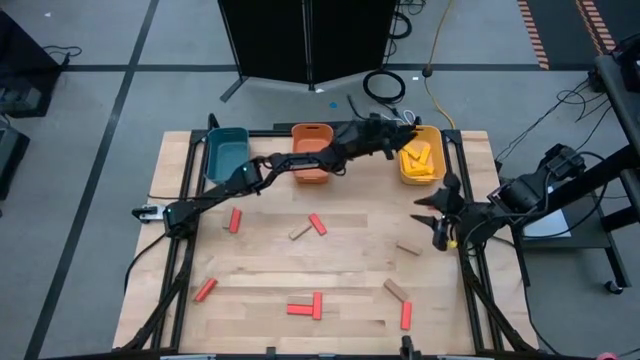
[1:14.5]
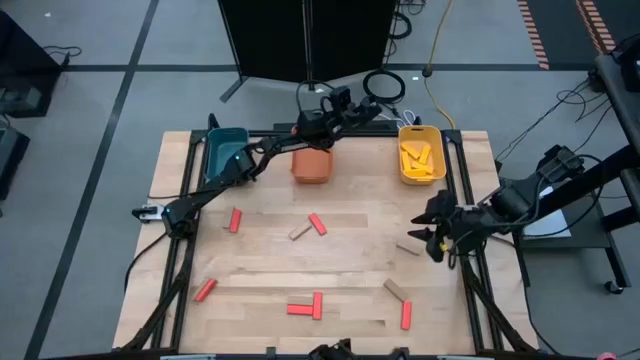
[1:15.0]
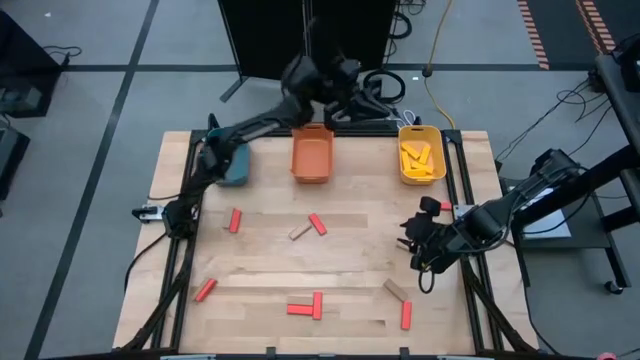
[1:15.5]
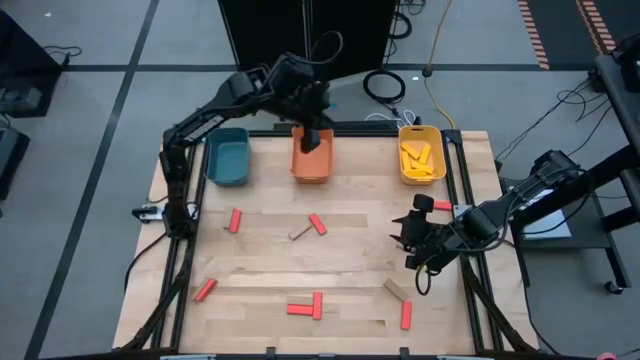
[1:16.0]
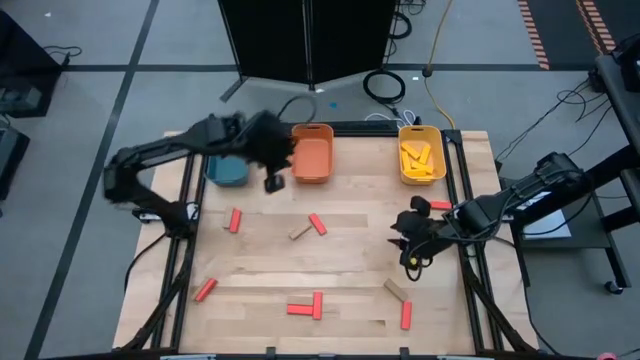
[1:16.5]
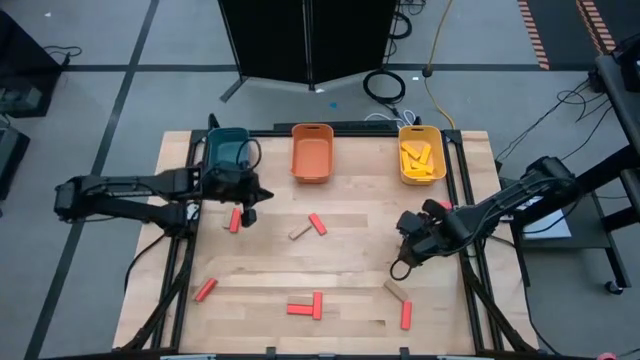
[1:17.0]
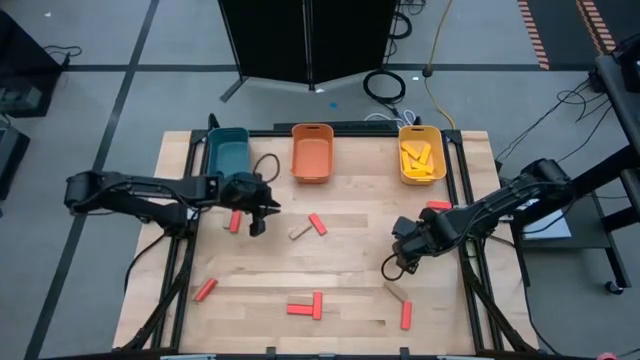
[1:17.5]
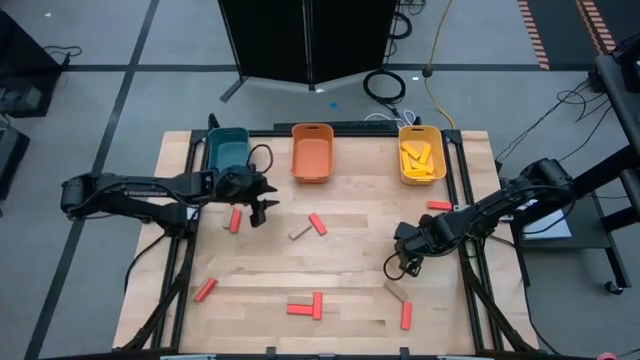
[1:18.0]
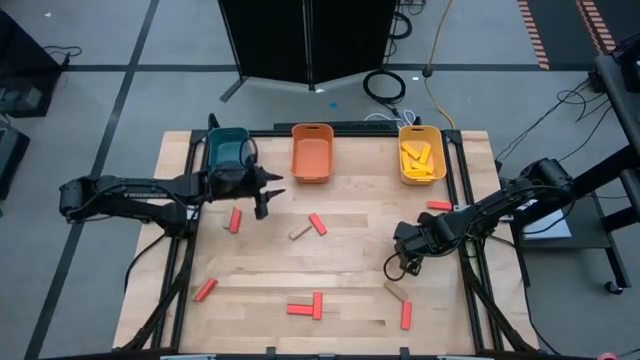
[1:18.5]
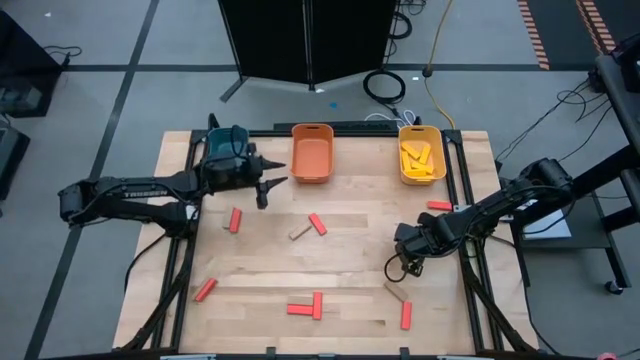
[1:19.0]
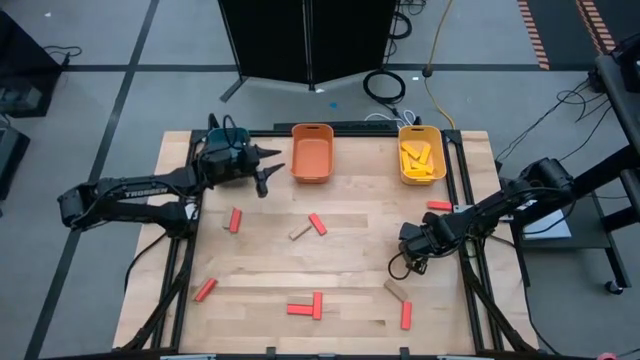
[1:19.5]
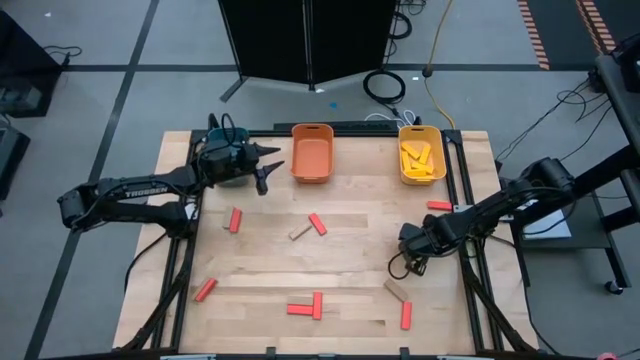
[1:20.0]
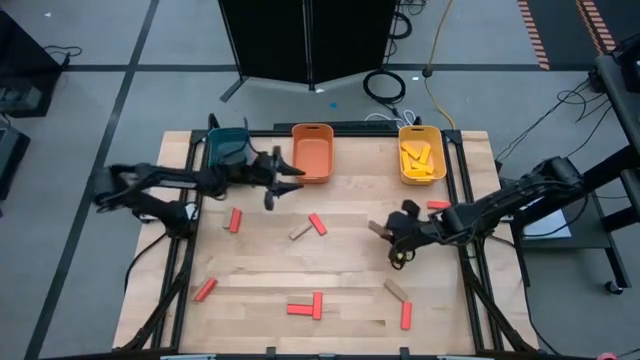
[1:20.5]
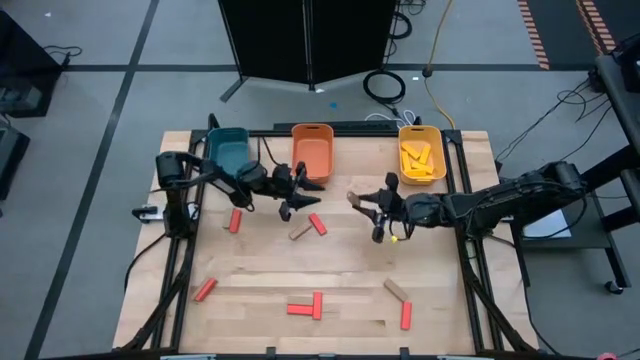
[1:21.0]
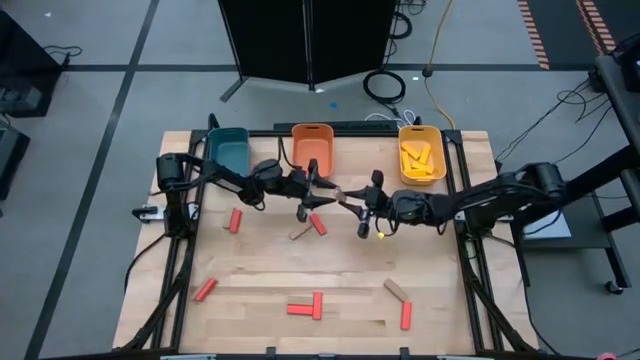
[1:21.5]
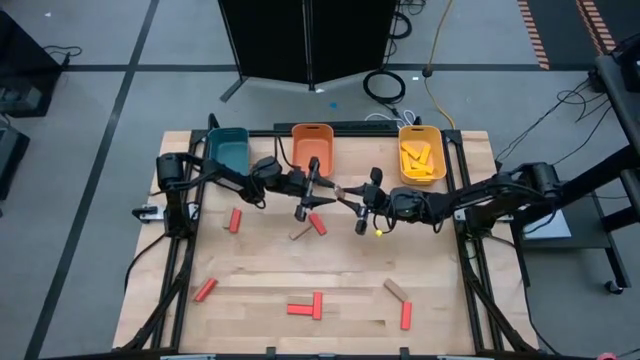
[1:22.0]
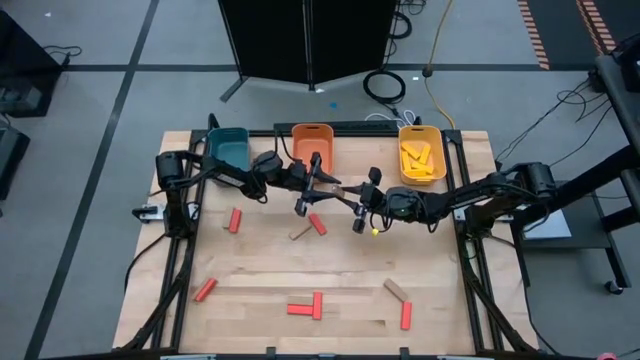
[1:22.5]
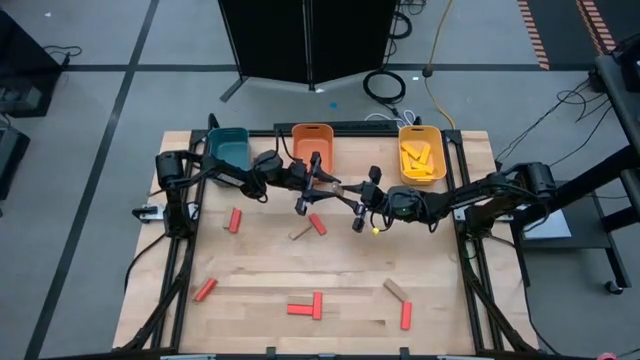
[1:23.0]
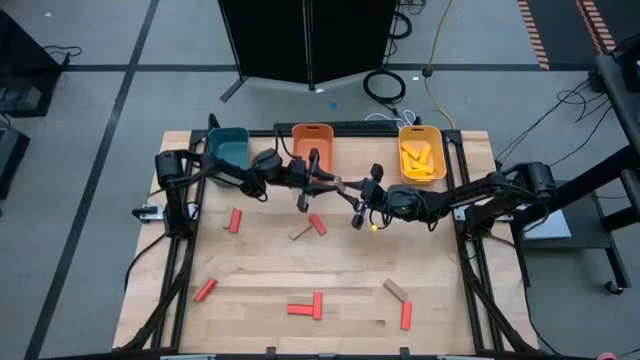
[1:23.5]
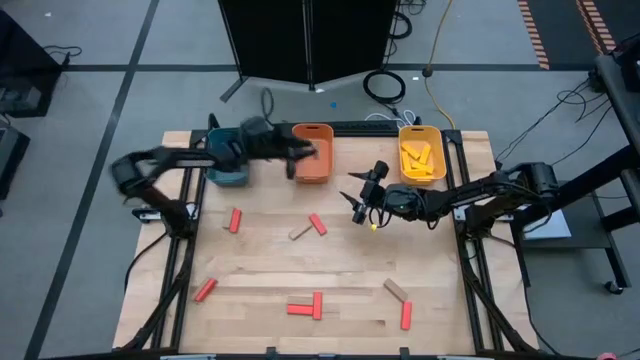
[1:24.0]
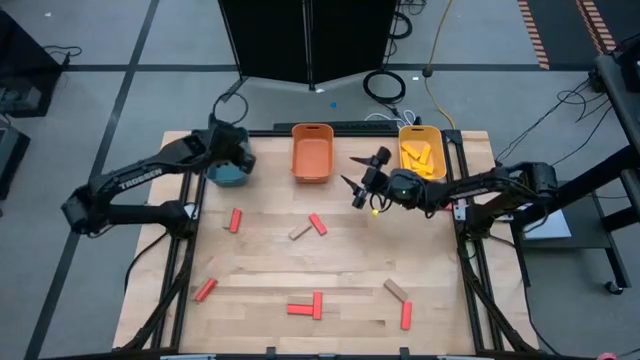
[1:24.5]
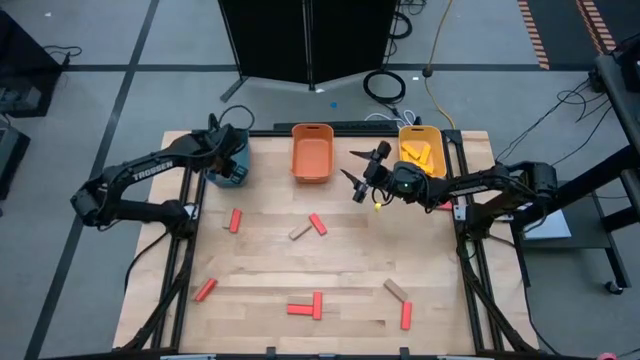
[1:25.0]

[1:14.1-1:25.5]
Task: Sort blocks
Put the brown block into the blue bin

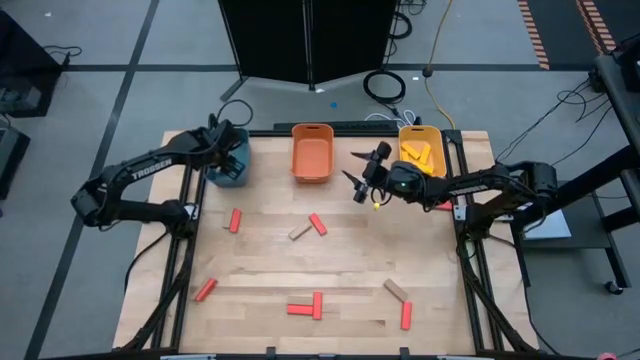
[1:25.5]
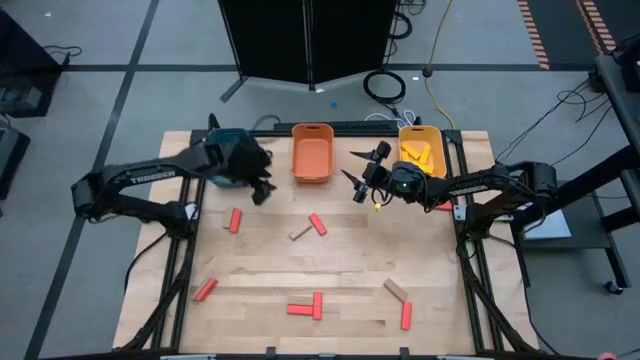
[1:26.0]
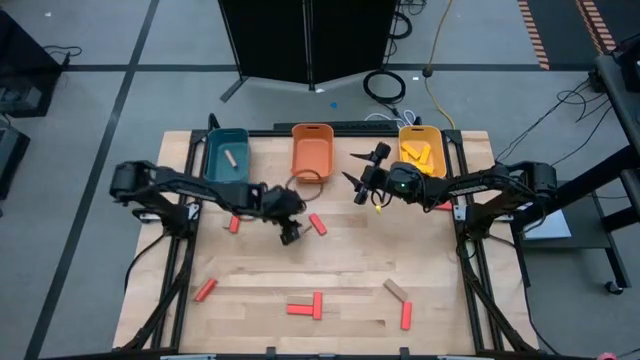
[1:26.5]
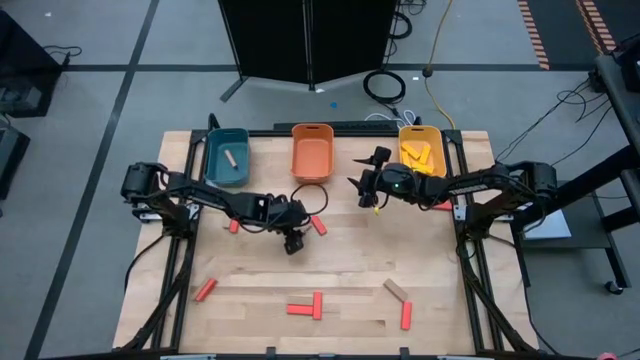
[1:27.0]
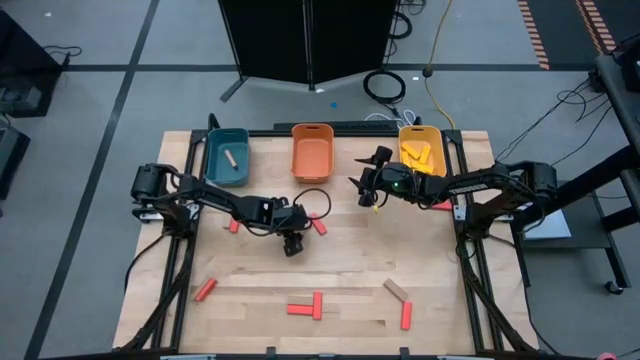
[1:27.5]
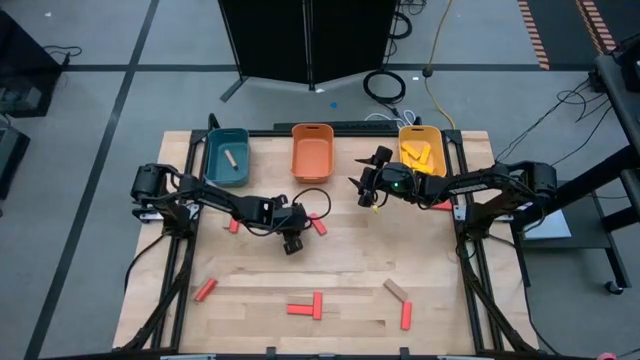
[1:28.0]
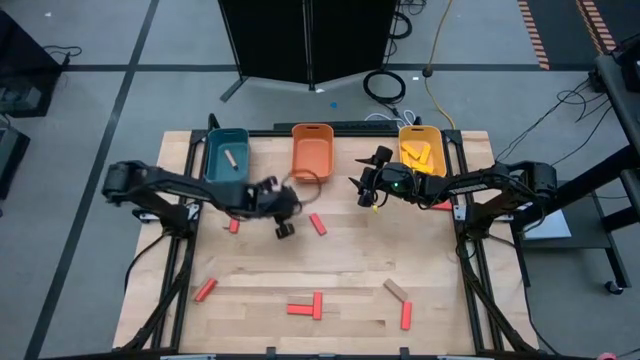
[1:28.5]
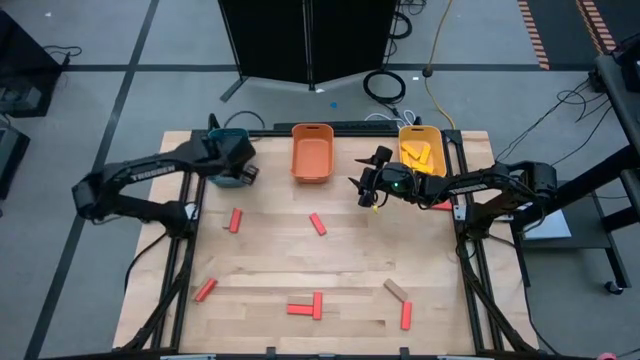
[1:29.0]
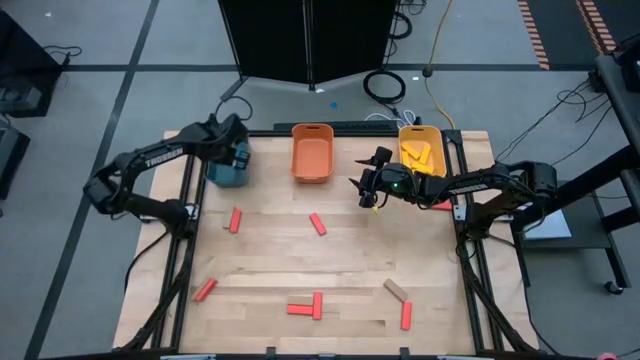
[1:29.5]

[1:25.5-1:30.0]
Put the brown block into the blue bin

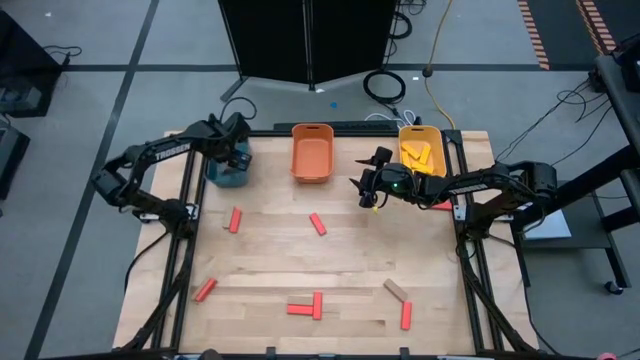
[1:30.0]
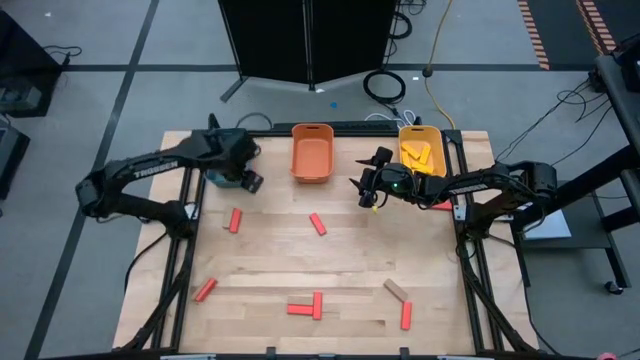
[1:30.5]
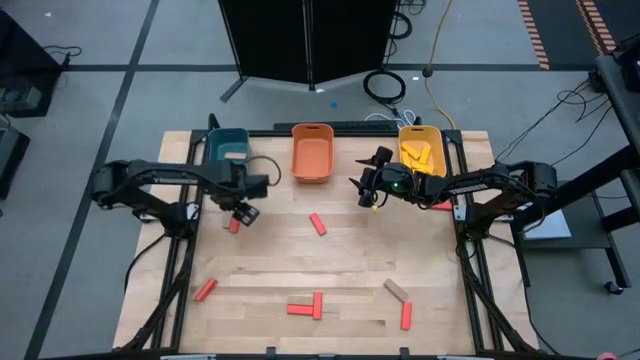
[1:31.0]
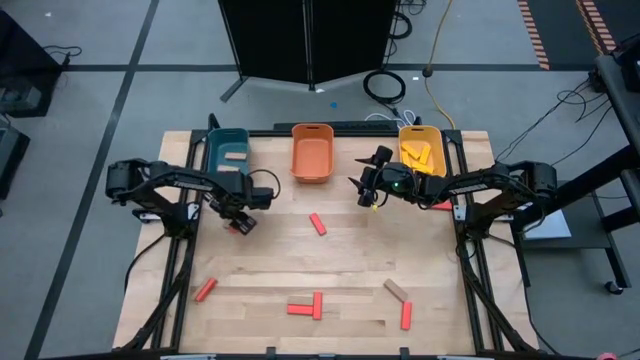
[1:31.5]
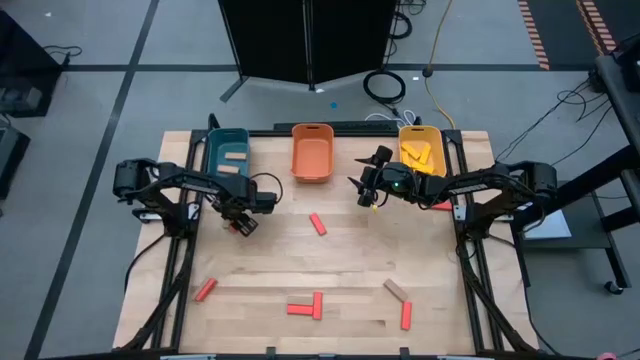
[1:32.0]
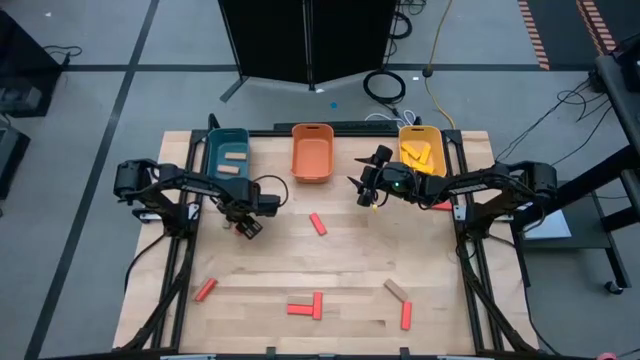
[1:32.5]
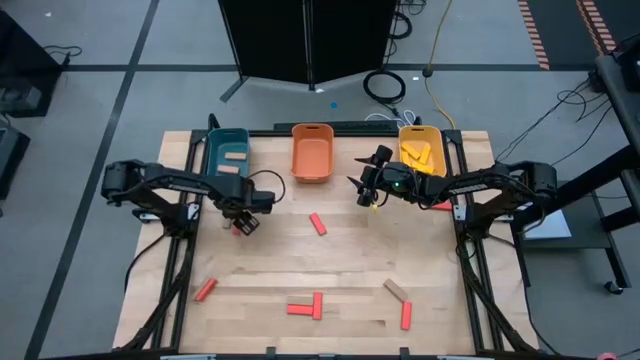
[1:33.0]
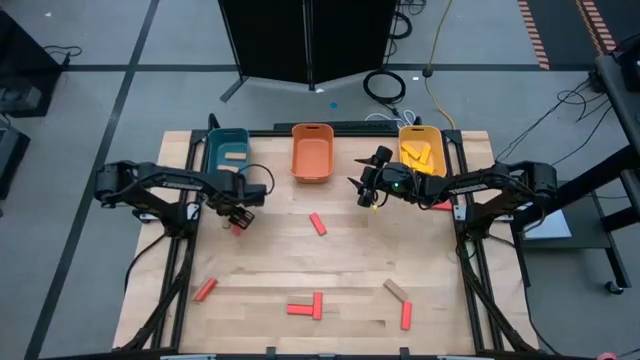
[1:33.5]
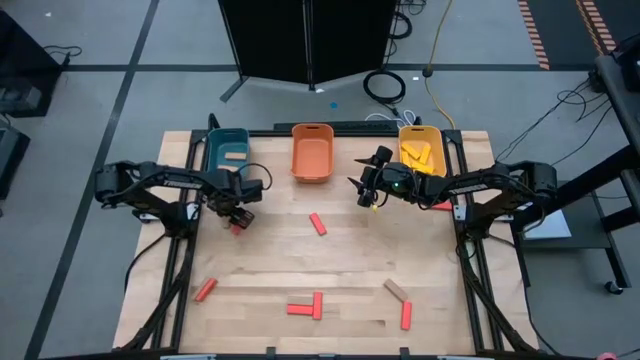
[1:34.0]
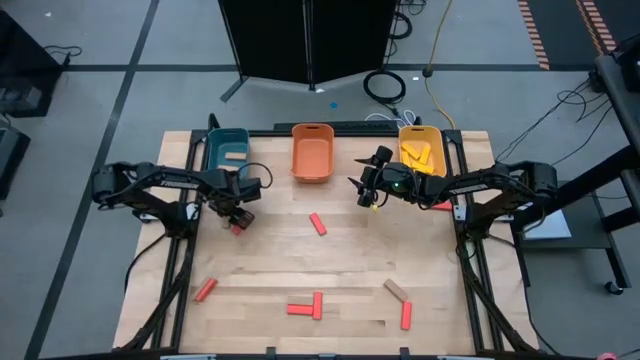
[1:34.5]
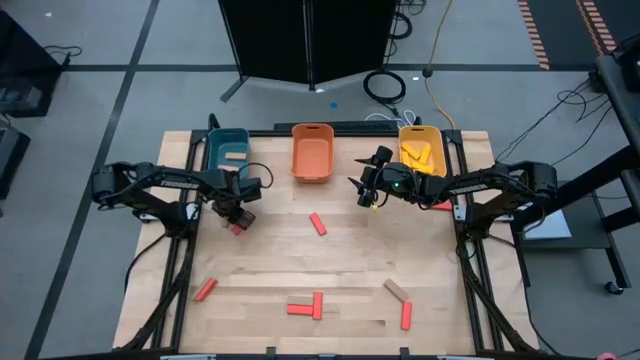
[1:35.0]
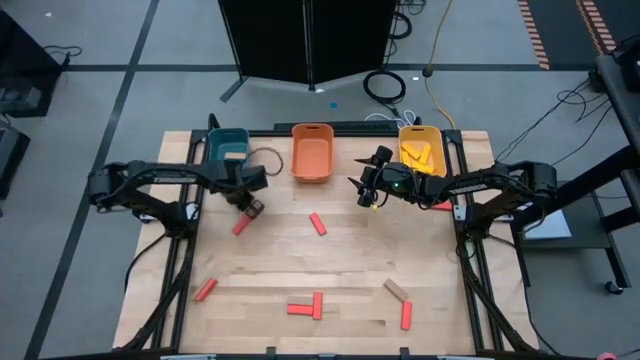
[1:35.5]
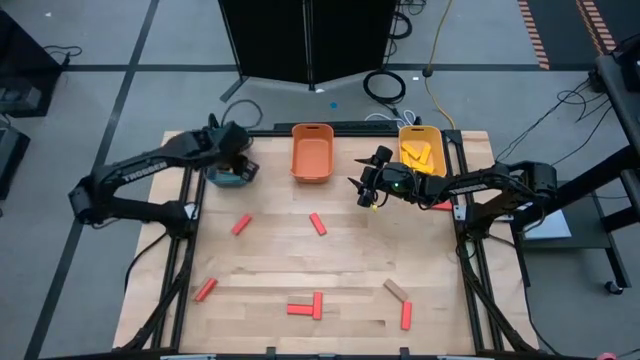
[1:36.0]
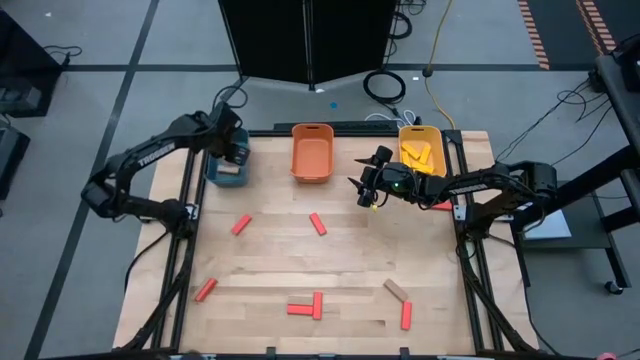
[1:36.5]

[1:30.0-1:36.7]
Put the brown block into the blue bin
